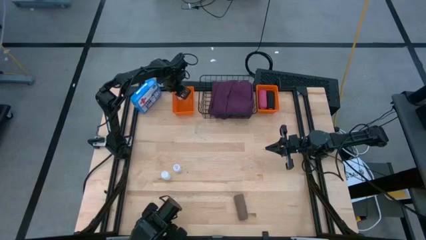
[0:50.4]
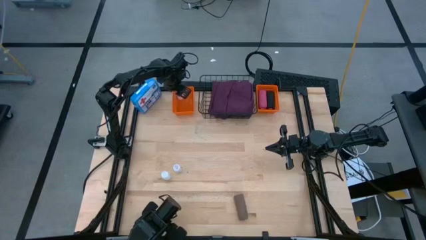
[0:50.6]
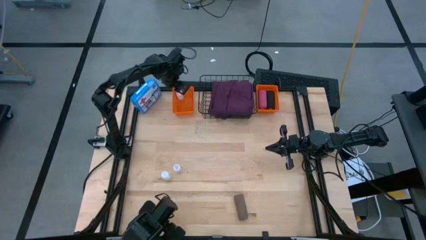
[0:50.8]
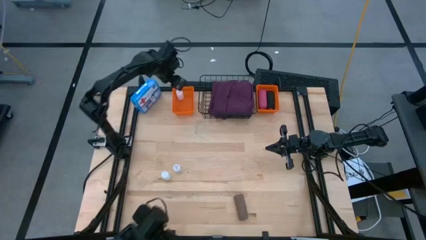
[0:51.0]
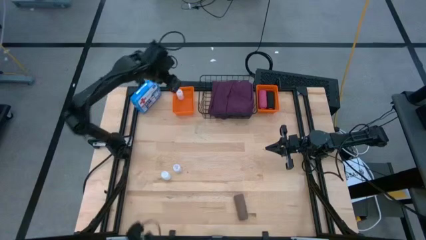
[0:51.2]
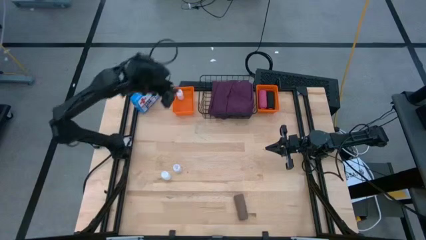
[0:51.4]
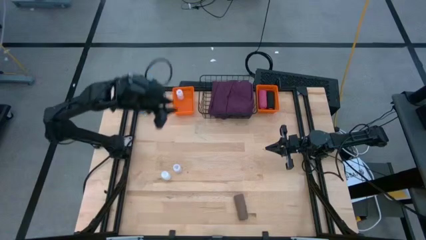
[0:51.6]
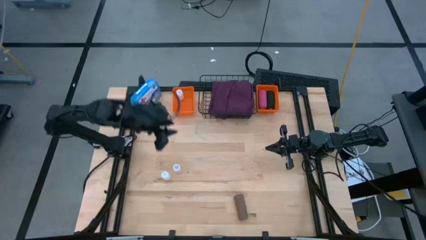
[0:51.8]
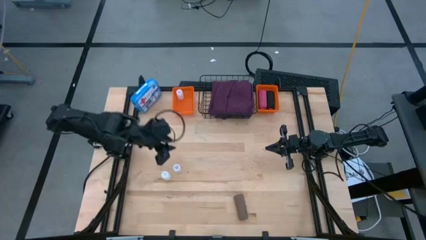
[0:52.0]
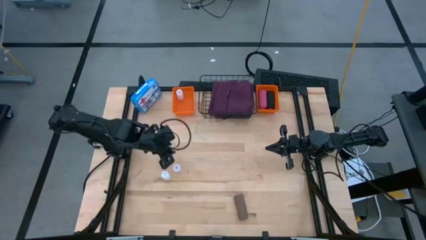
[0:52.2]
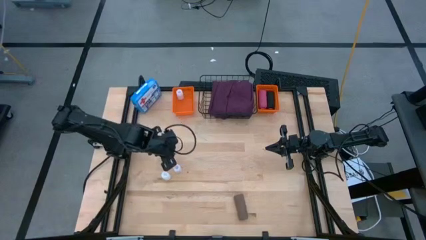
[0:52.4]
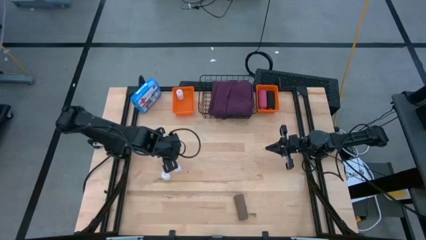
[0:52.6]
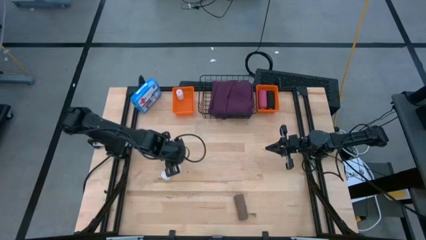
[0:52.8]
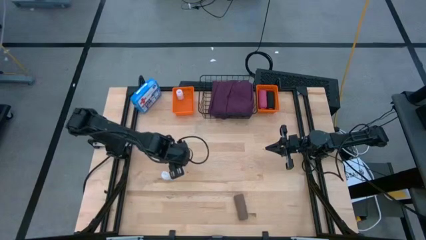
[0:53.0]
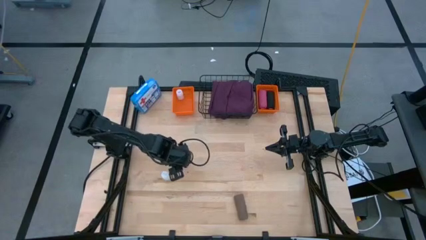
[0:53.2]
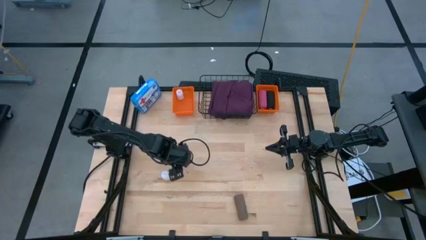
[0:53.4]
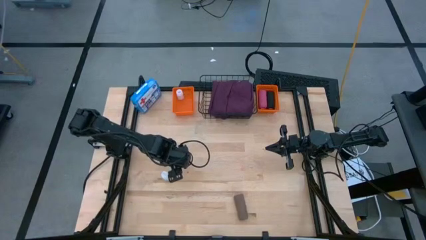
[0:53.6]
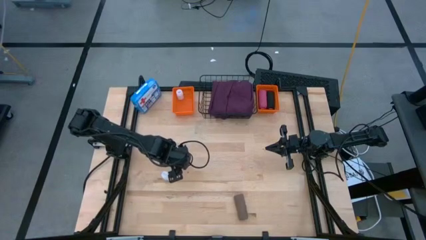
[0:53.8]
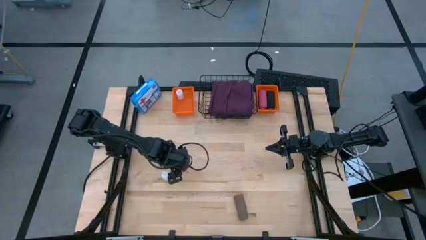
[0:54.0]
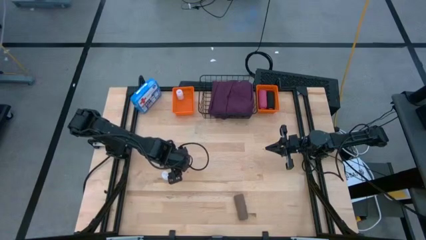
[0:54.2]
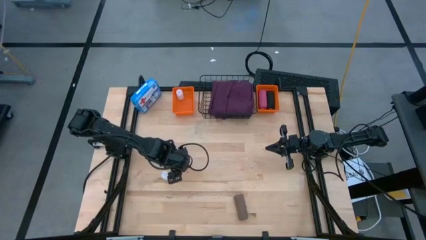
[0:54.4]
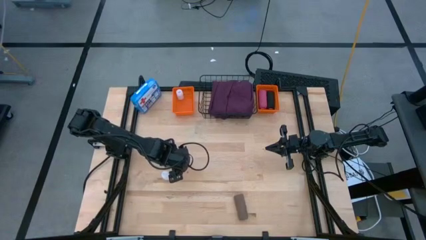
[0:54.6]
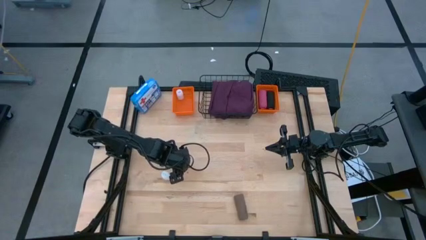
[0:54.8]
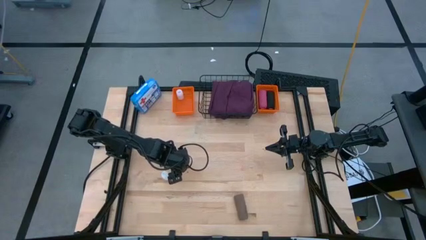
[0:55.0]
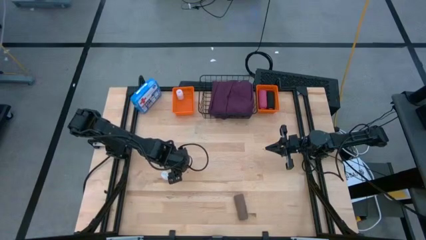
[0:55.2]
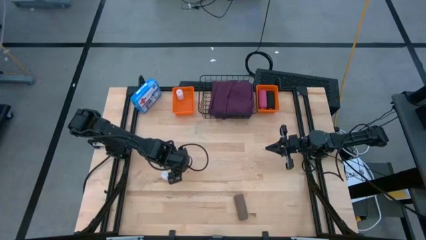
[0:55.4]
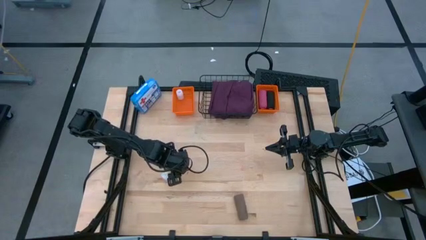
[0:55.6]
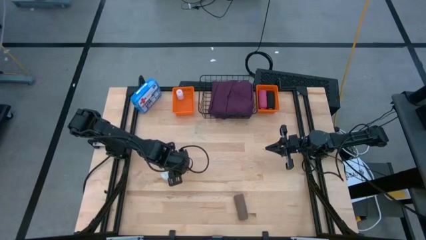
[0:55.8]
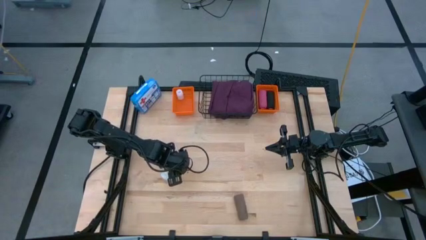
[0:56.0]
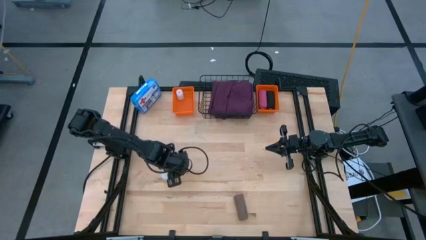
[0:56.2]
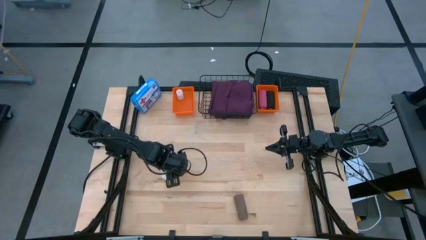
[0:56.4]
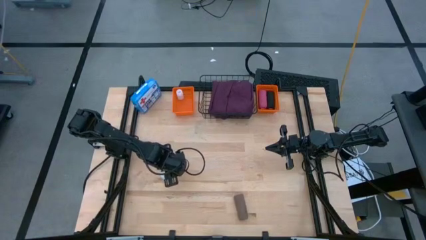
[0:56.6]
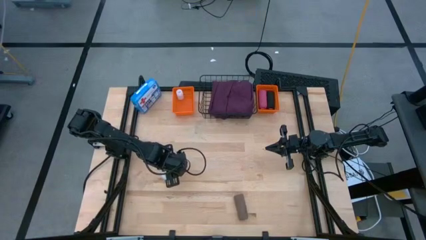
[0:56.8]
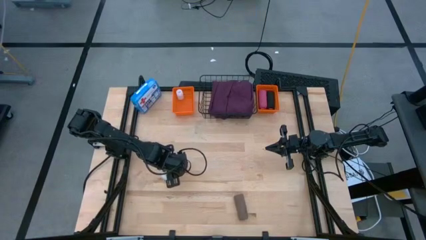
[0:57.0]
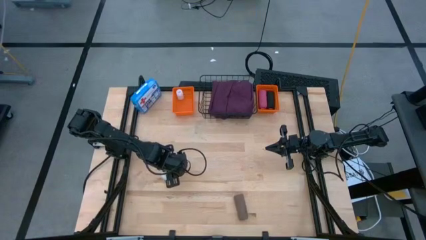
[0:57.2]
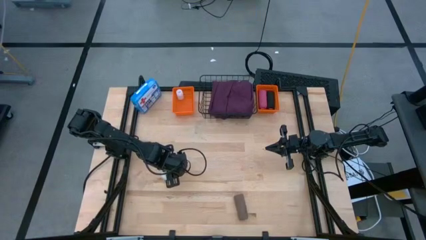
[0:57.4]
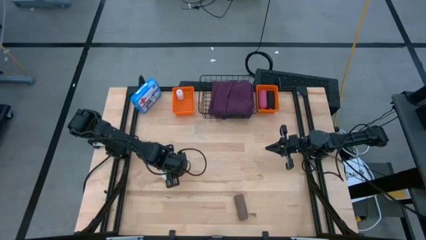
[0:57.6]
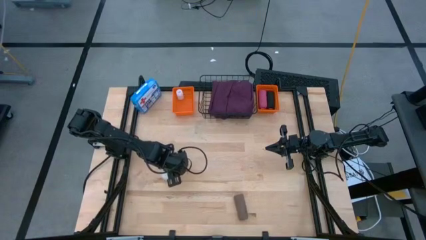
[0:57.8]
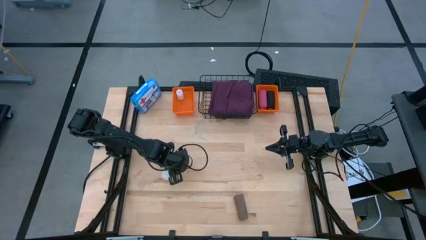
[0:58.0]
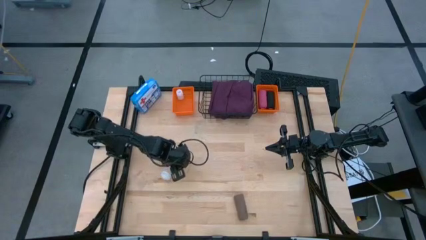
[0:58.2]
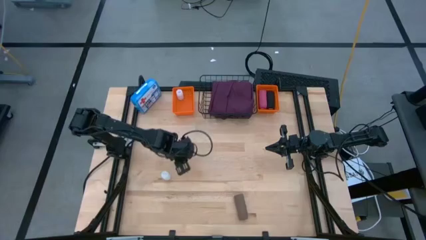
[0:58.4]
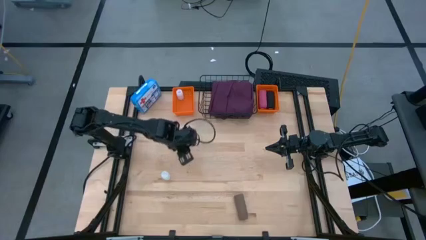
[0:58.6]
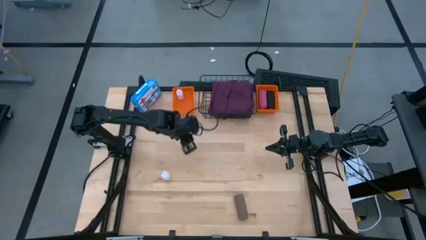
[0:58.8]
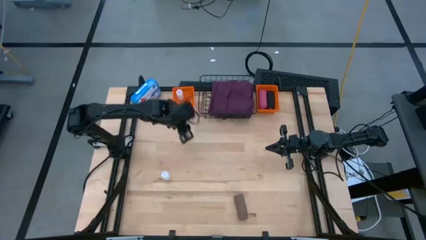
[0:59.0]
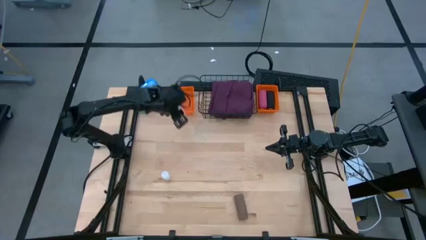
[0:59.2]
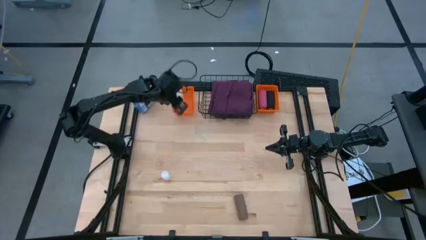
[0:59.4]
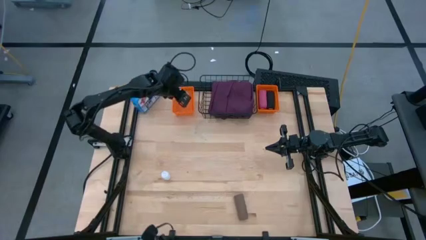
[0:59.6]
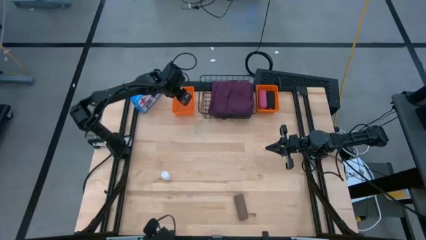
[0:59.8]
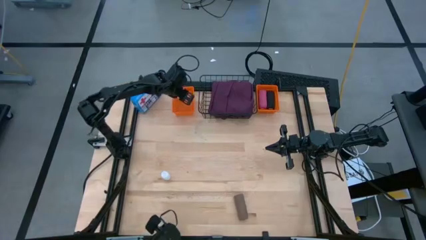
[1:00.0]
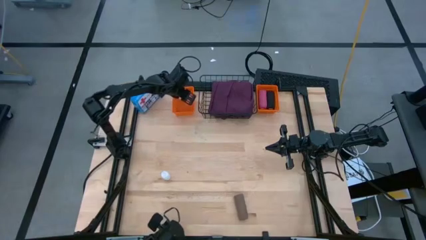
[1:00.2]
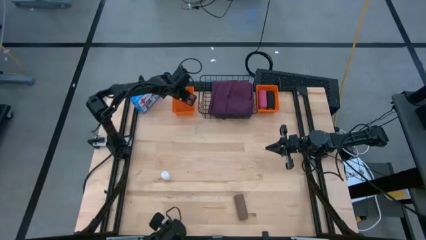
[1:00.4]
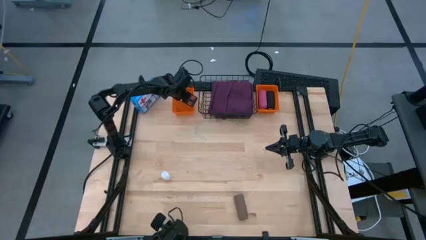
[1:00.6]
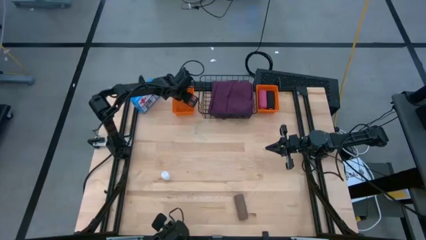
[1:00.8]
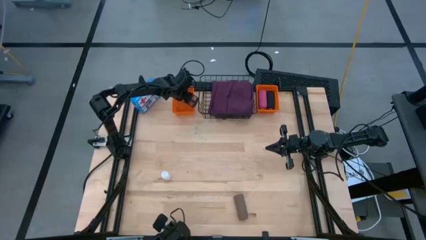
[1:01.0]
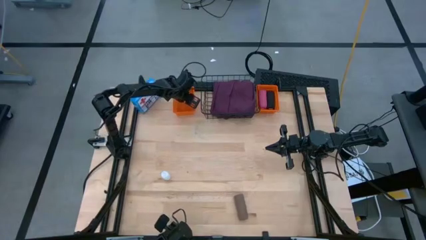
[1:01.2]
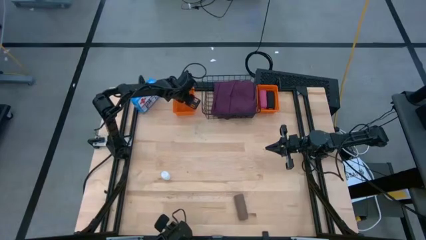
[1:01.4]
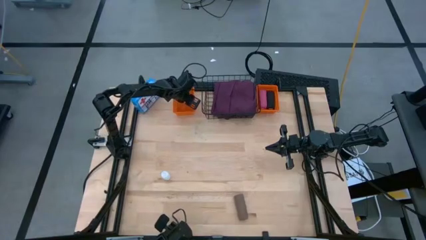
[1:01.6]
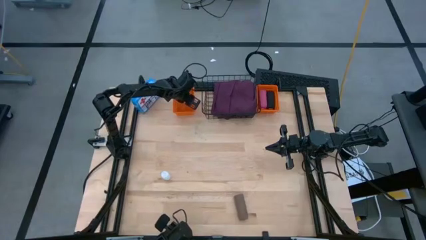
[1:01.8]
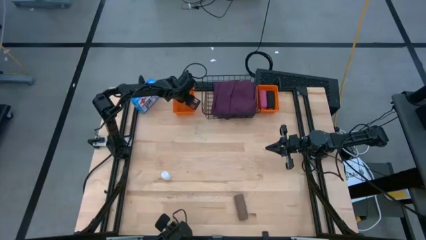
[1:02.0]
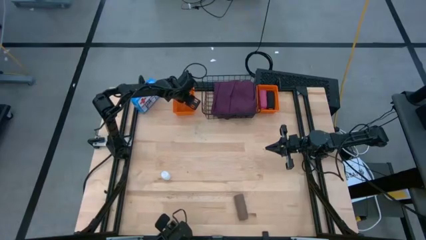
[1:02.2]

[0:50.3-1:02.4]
Task: Pick & place medical supplies in basket/bin
Put the right pill bottle into the left orange bin
